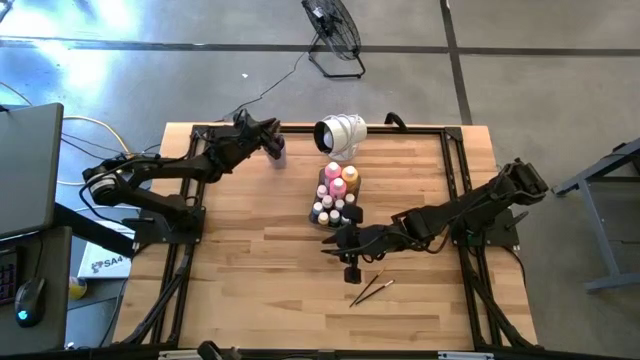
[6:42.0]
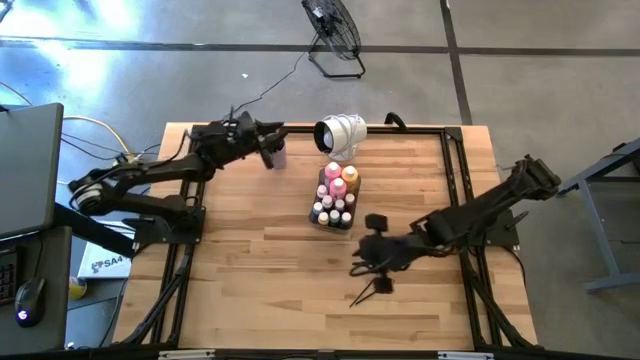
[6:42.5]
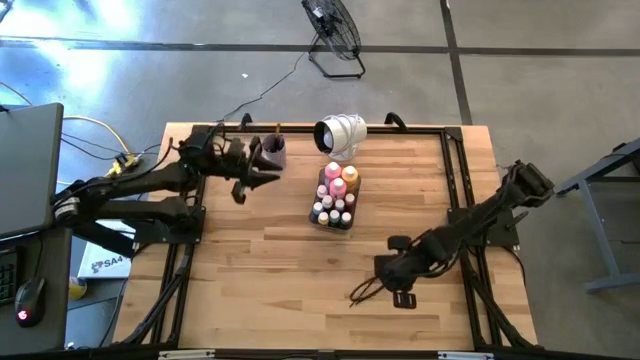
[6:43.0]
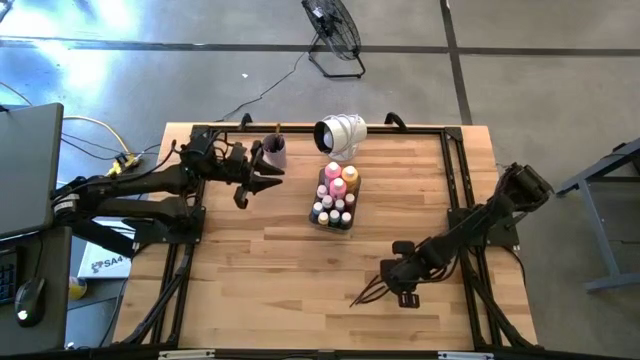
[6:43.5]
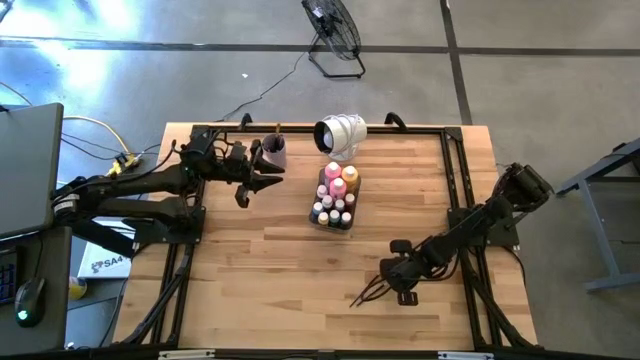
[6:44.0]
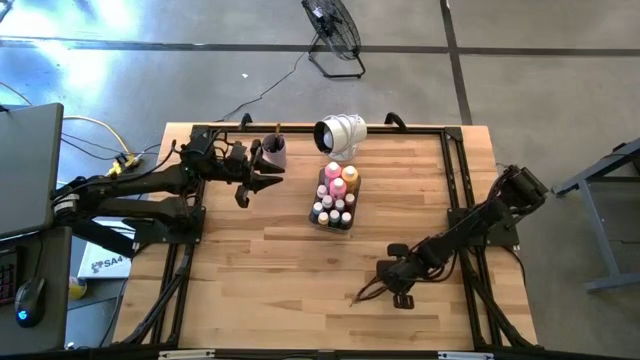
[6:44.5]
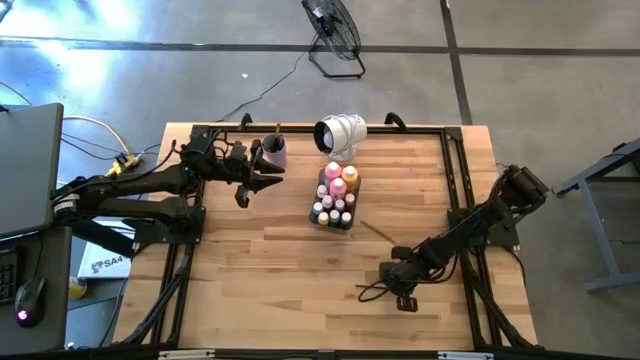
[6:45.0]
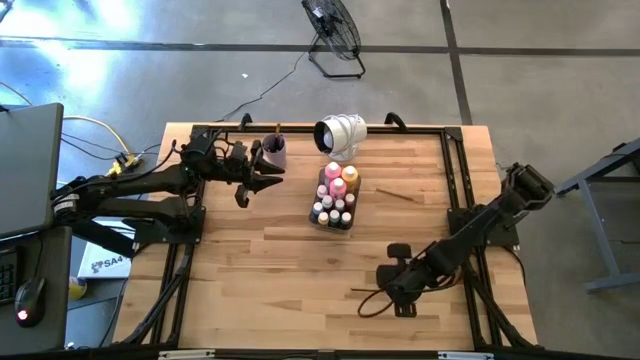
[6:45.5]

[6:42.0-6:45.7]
Task: Pick & Place Paint Supplies
Put the silver paint brush into the violet cup

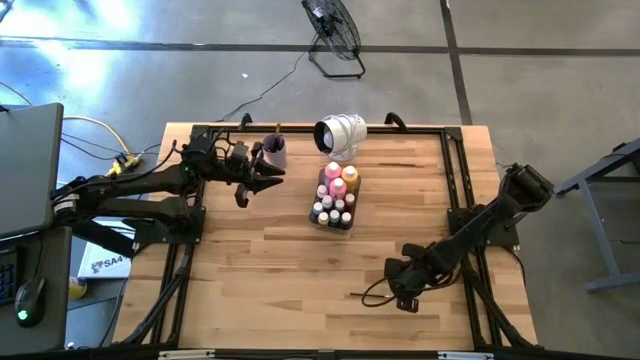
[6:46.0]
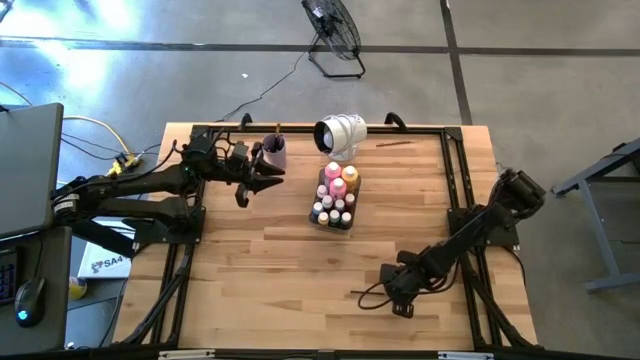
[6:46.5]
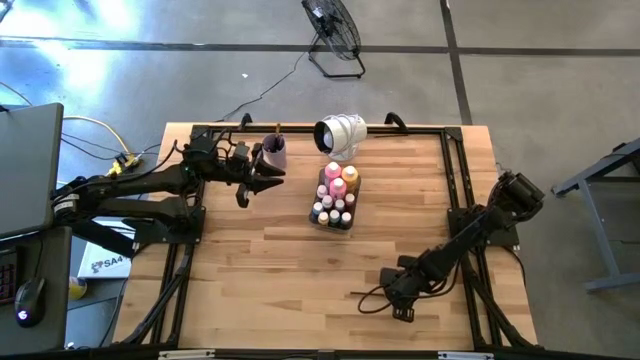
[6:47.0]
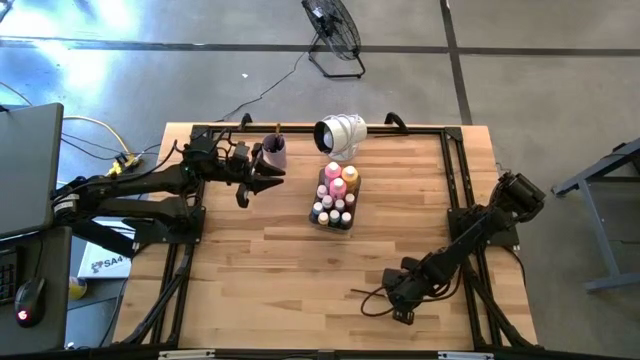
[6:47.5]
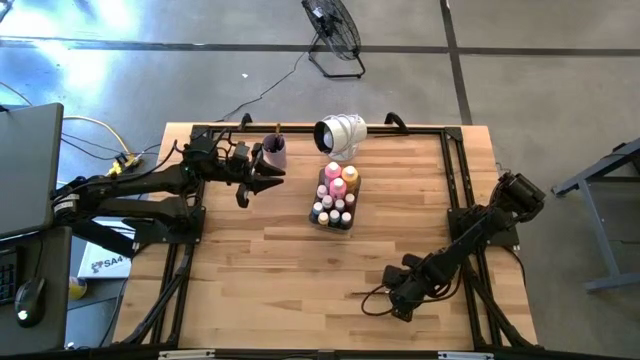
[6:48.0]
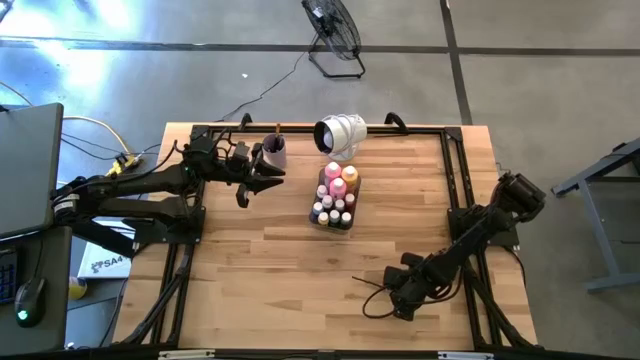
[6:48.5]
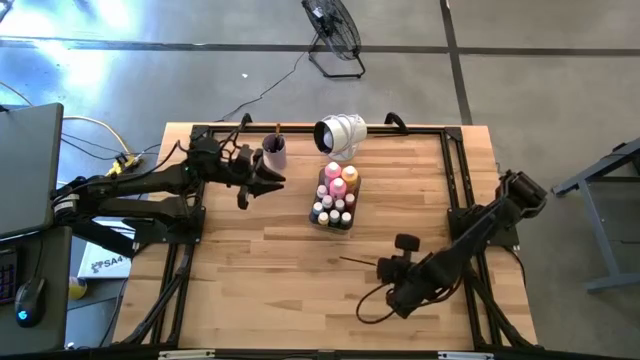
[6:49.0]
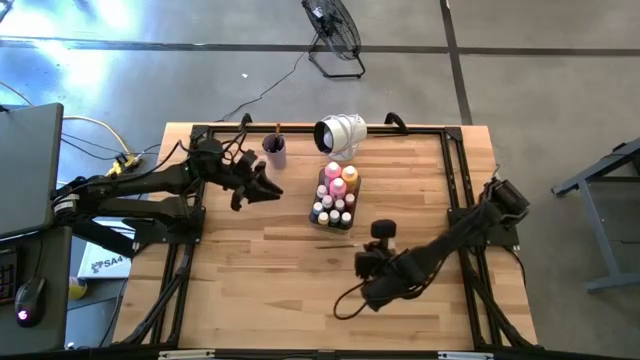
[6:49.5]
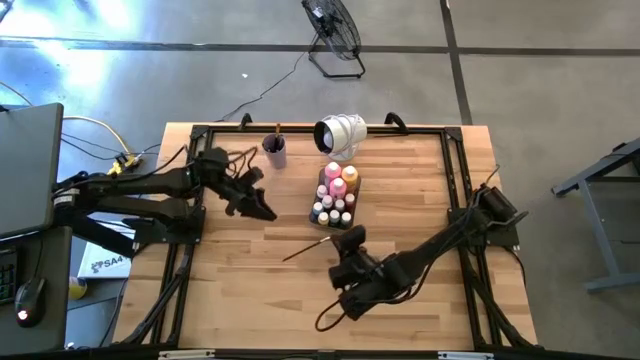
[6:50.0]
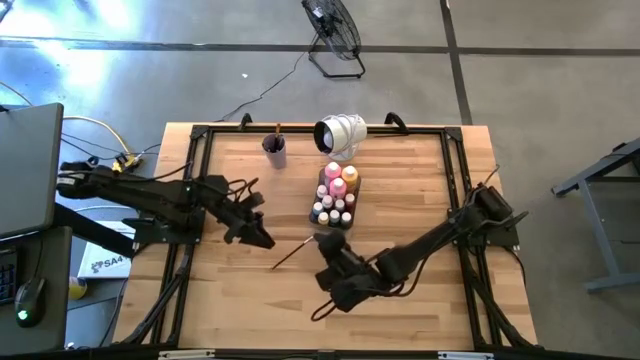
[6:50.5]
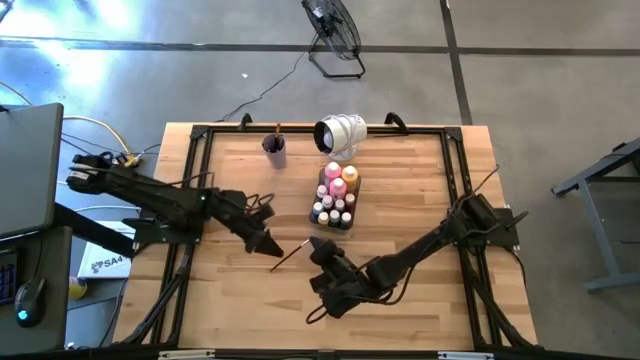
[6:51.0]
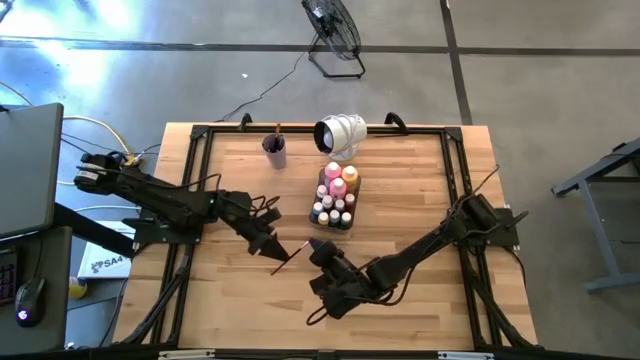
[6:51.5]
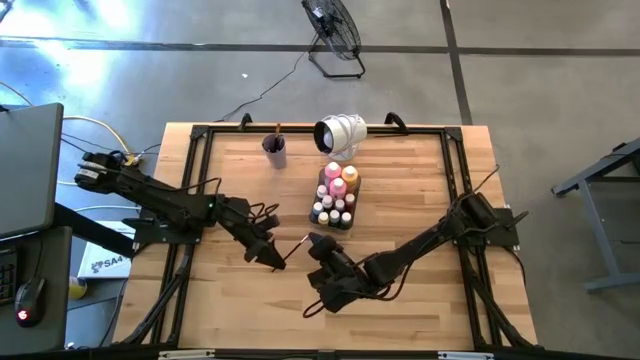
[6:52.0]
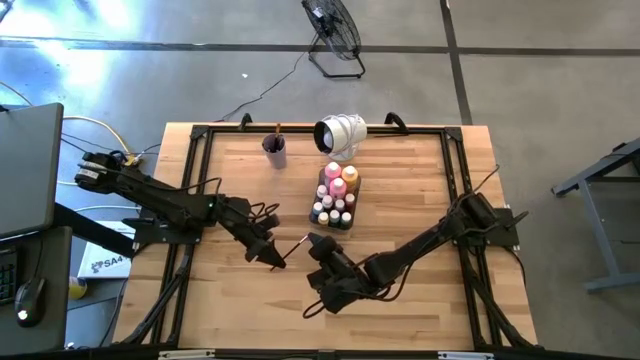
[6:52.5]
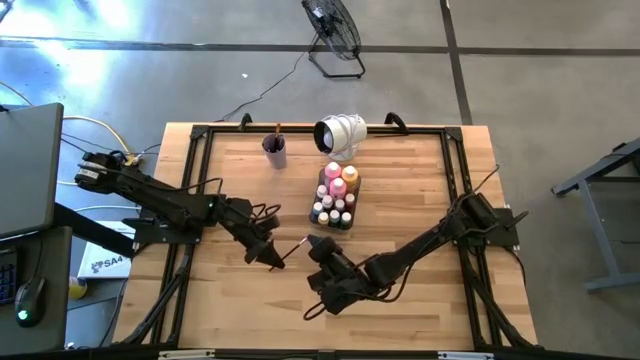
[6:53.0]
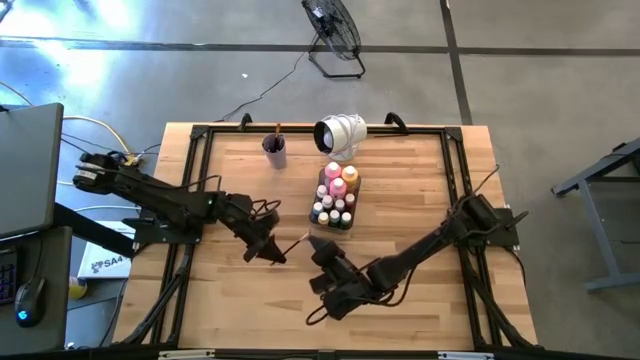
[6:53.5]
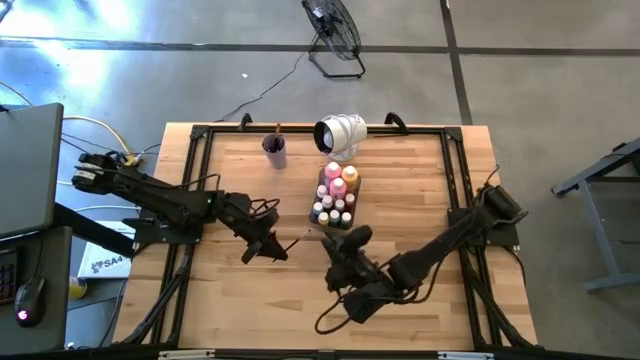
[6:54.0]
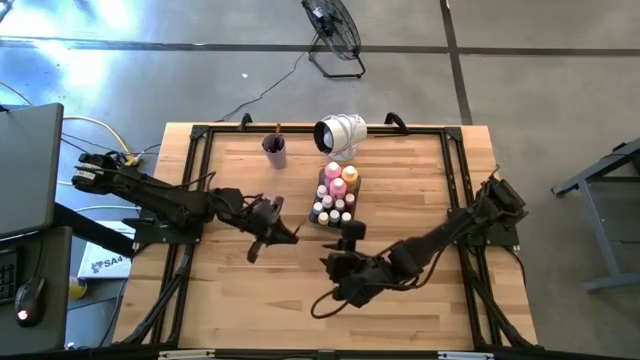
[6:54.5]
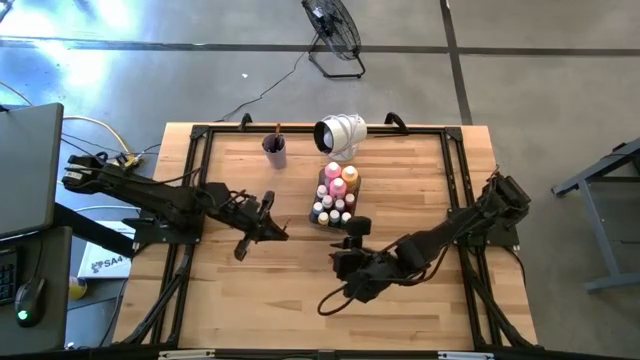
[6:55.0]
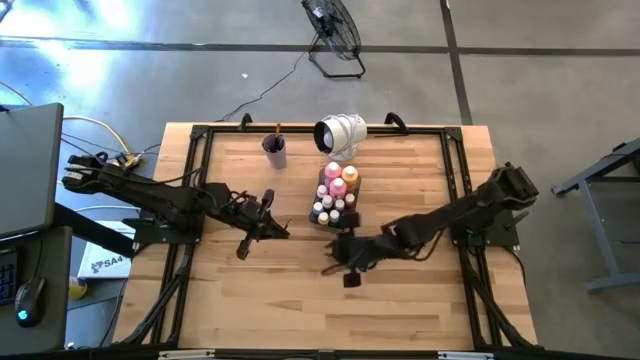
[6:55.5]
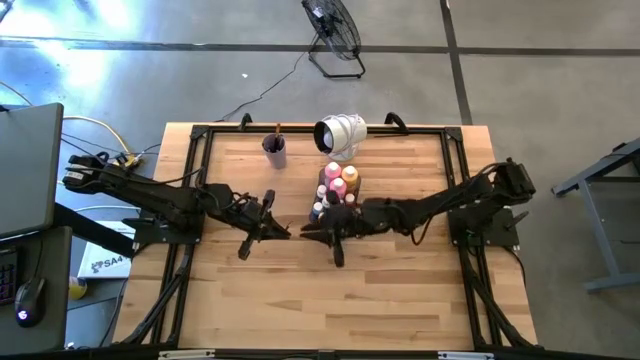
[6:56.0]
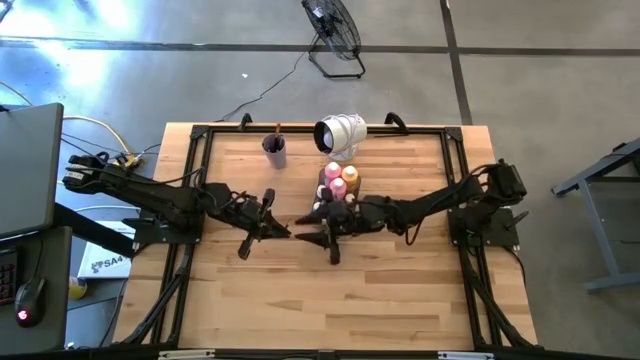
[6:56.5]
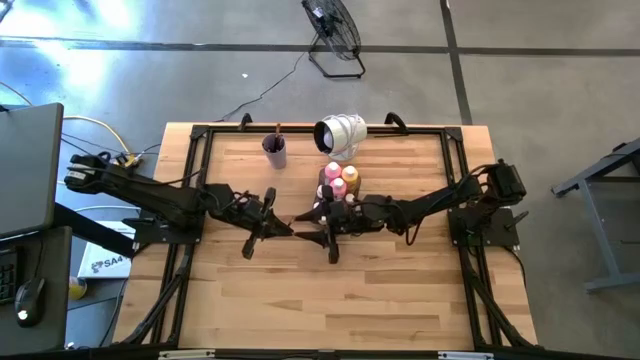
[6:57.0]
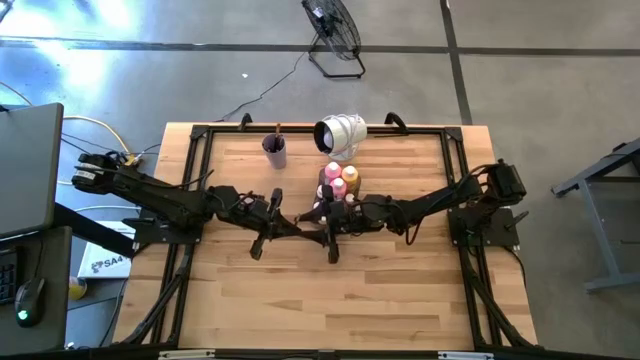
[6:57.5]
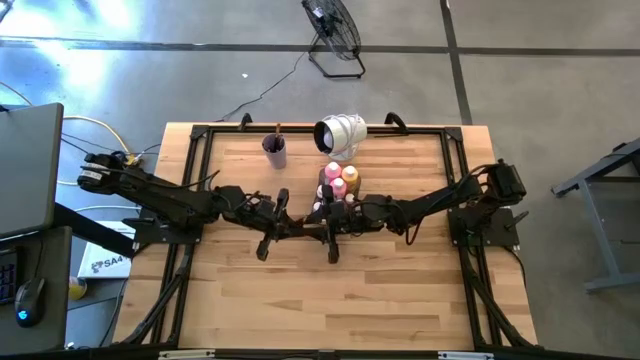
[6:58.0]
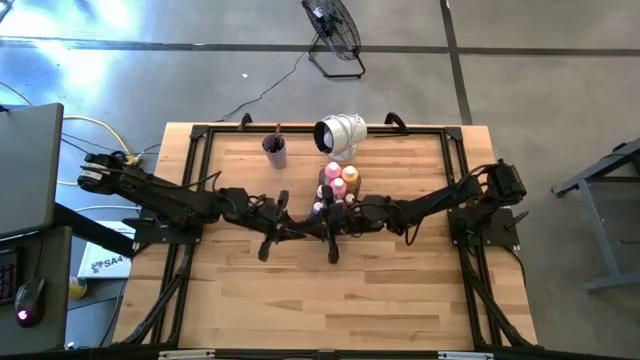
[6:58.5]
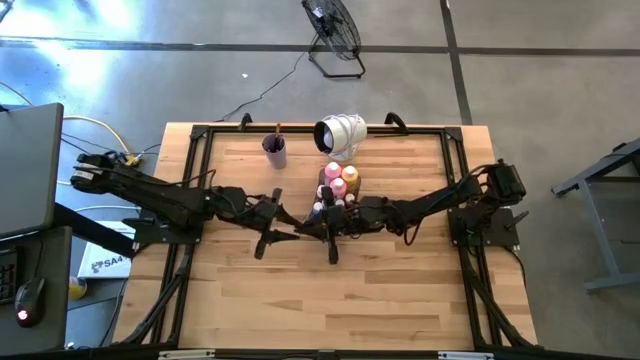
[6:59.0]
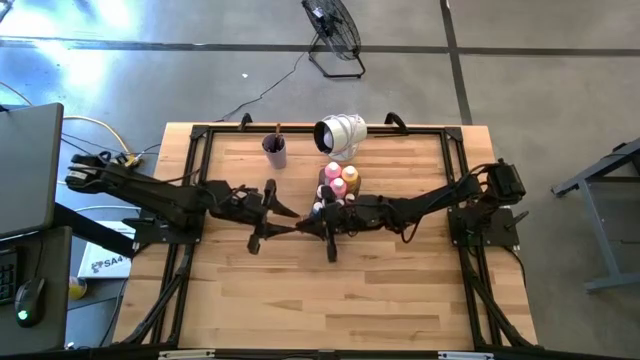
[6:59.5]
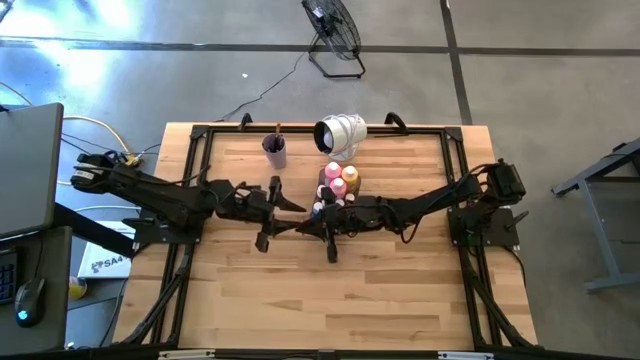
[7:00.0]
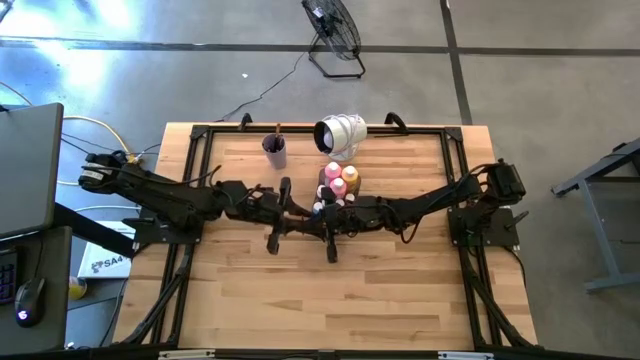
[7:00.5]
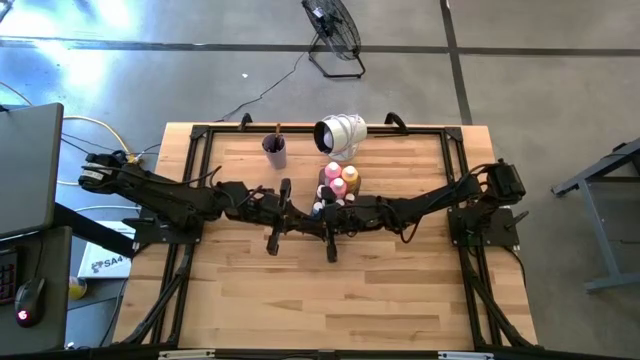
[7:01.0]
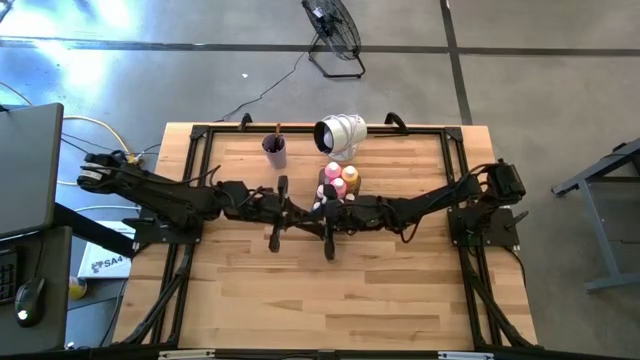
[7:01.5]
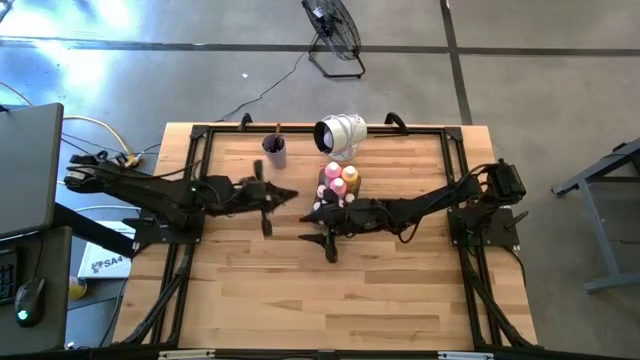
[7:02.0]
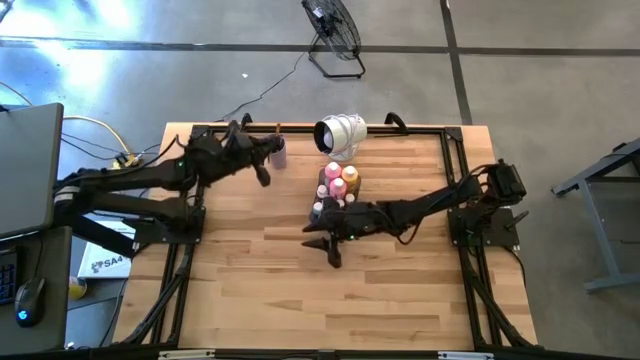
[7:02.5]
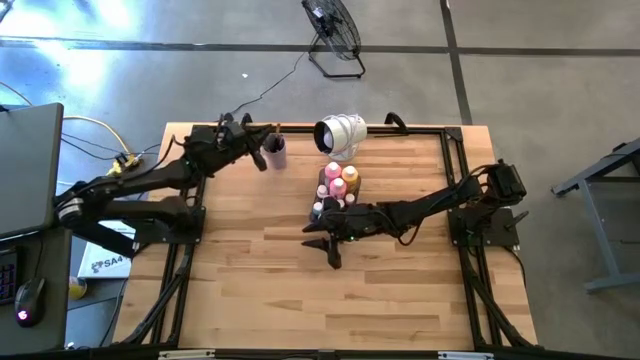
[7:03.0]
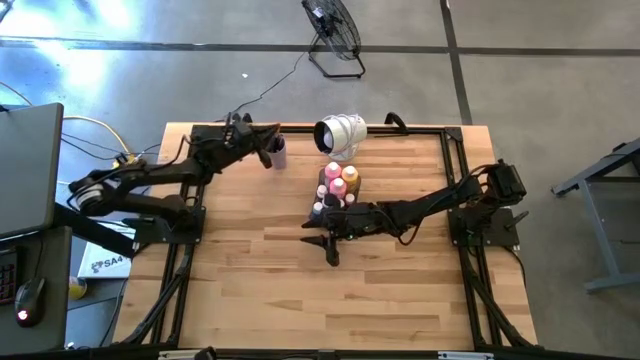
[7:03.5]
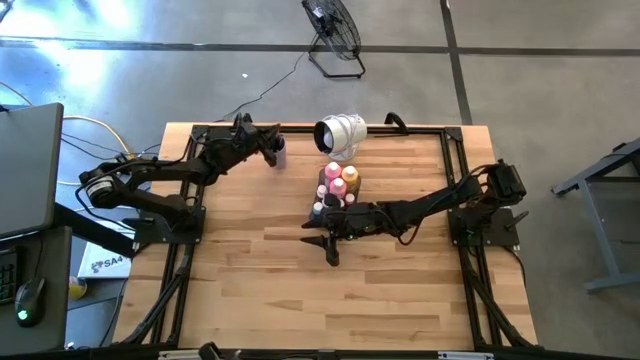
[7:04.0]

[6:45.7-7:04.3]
Put the silver paint brush into the violet cup
